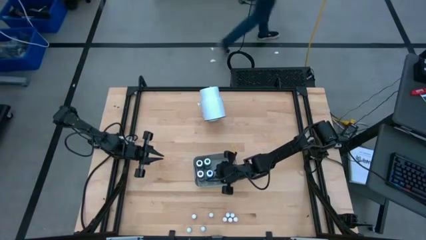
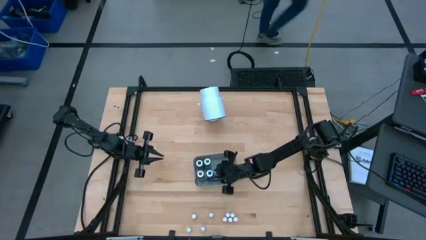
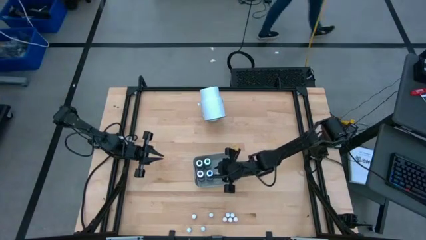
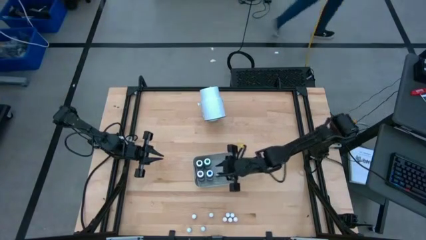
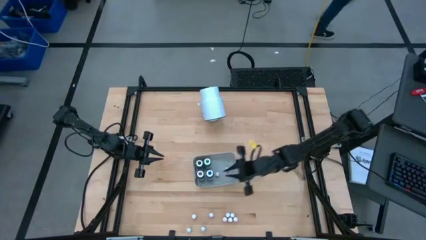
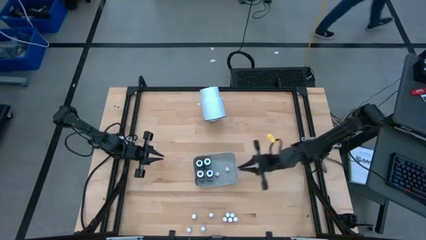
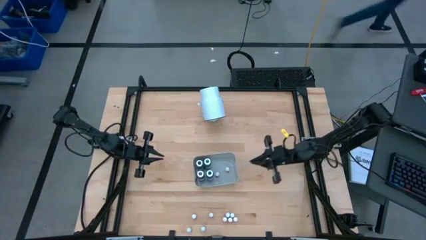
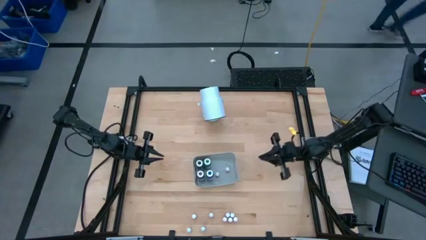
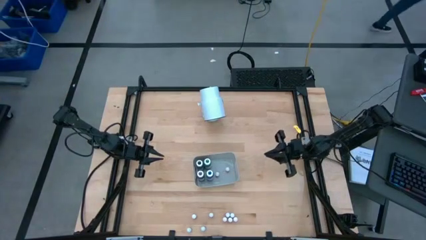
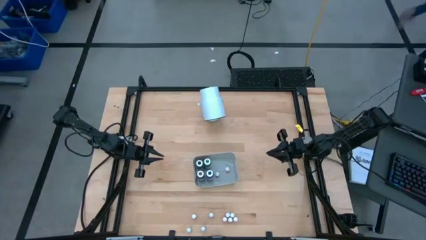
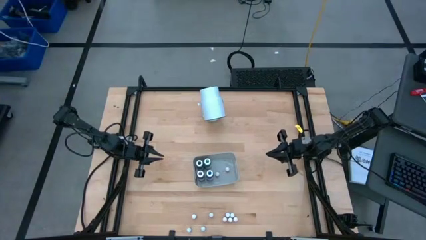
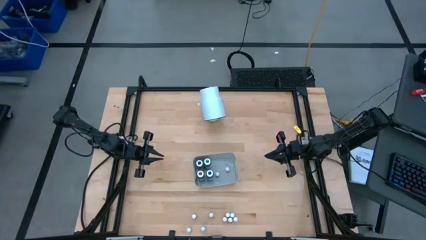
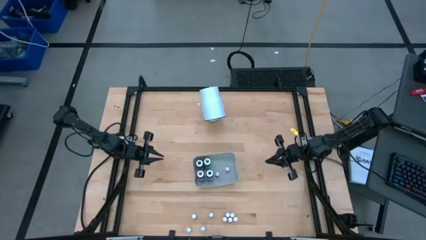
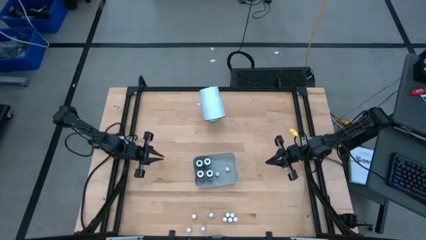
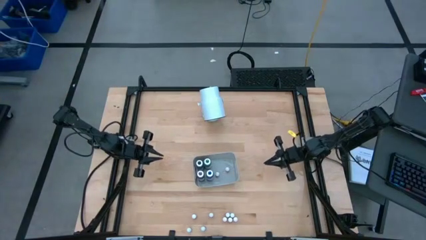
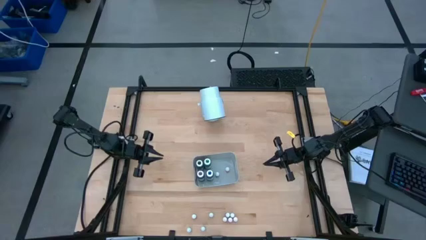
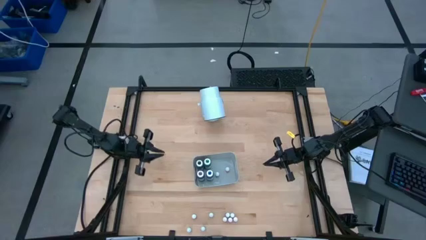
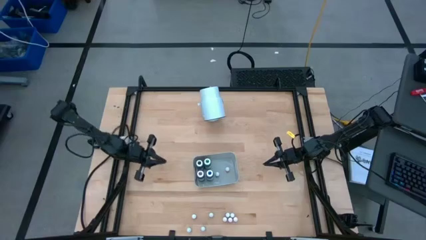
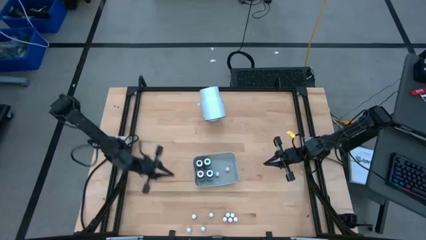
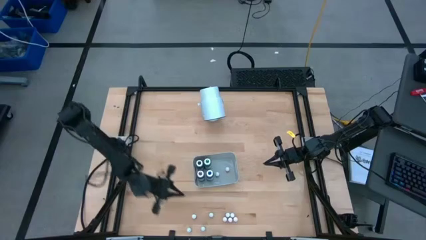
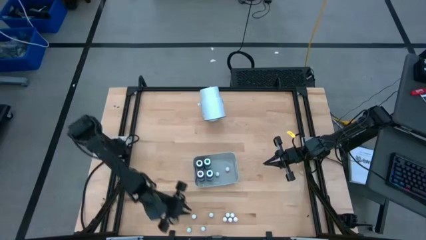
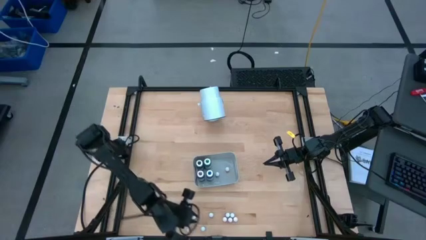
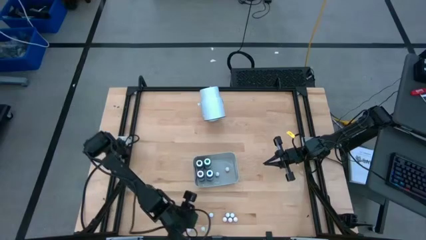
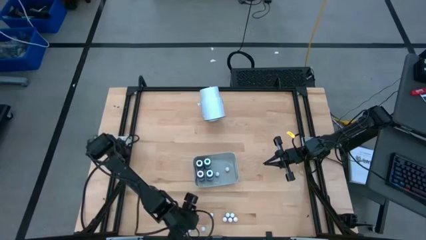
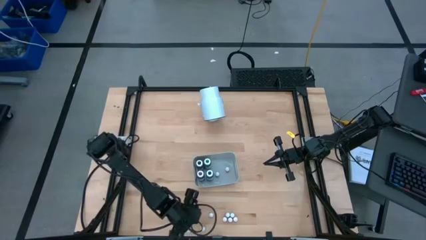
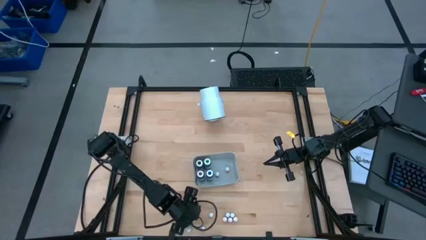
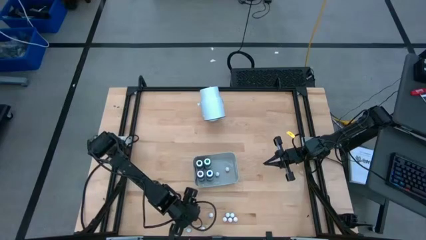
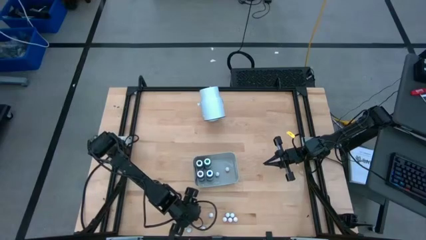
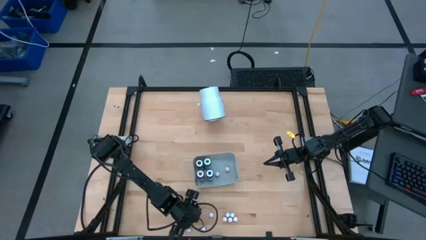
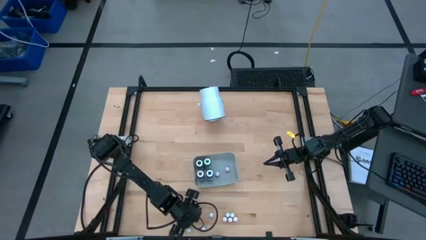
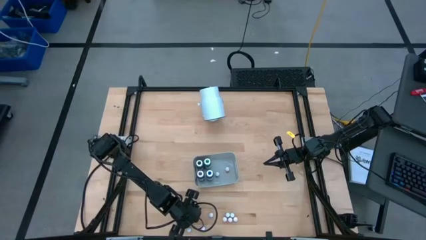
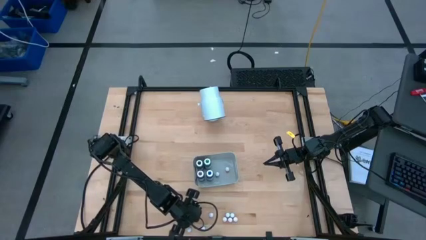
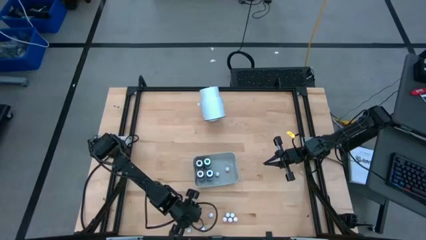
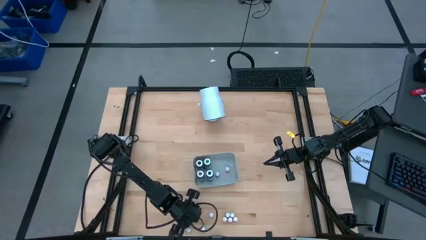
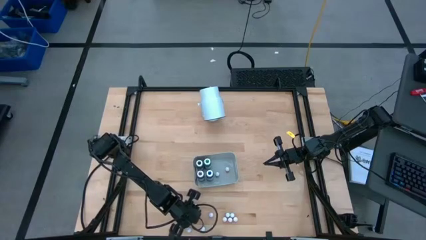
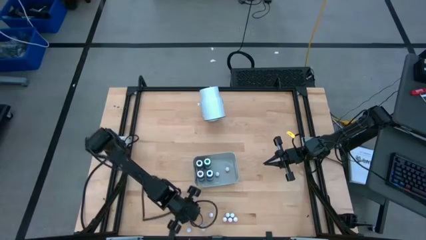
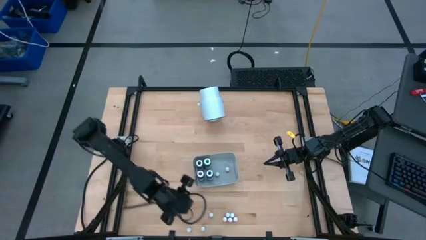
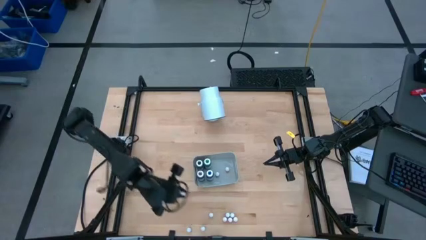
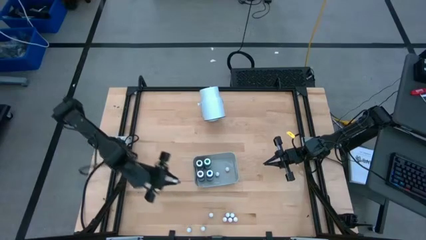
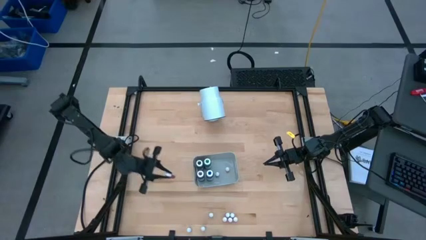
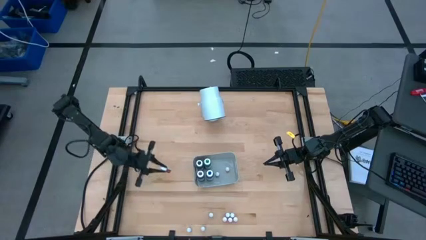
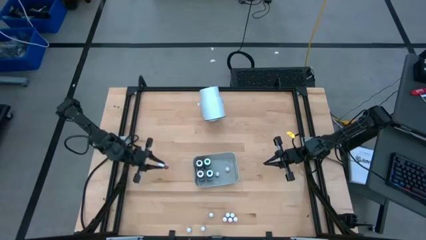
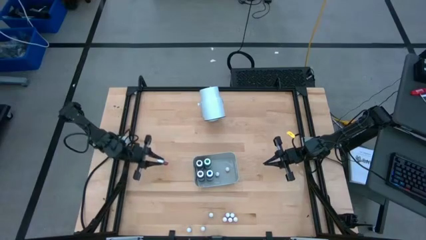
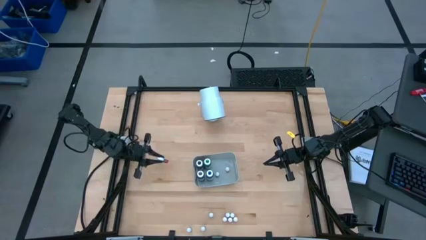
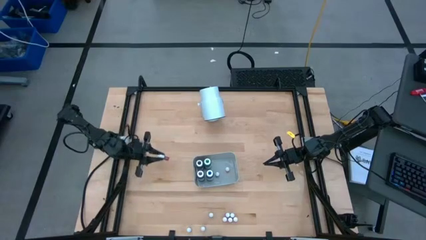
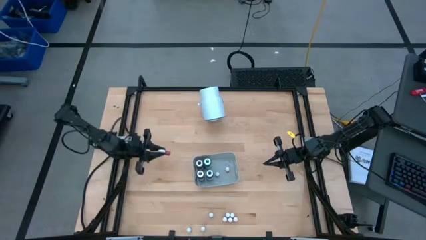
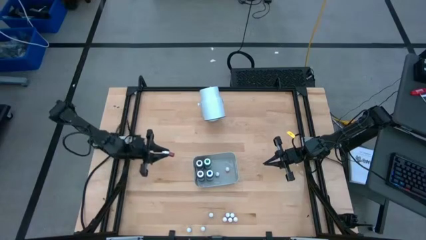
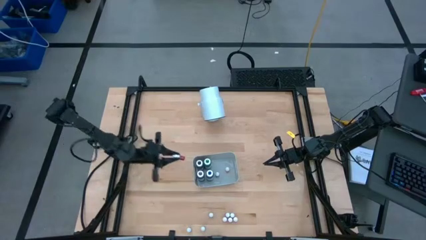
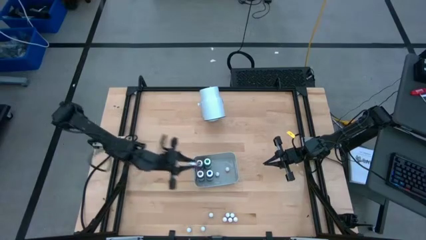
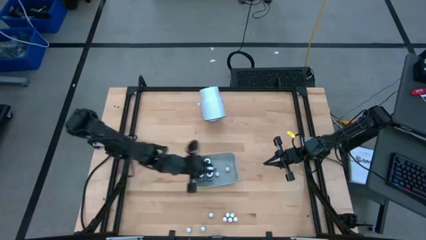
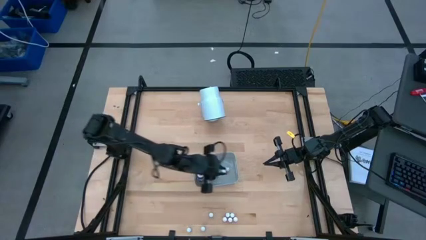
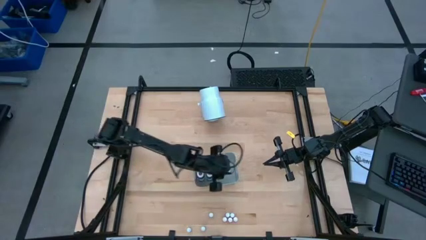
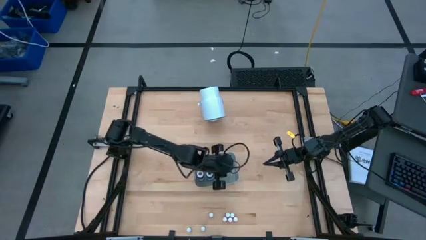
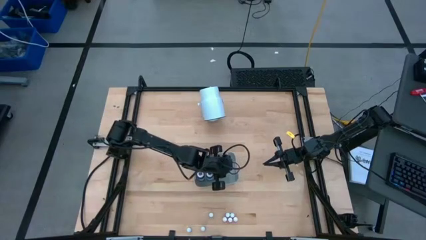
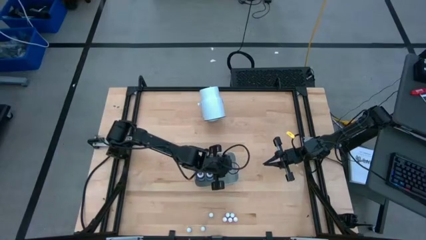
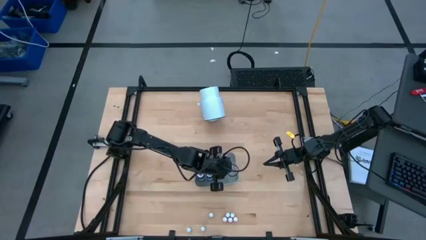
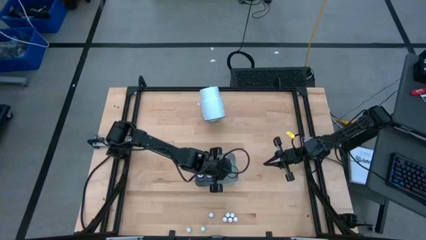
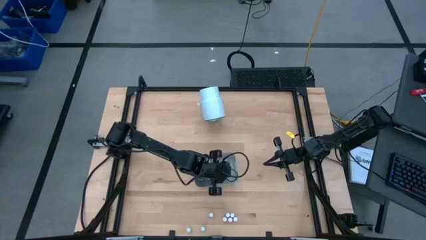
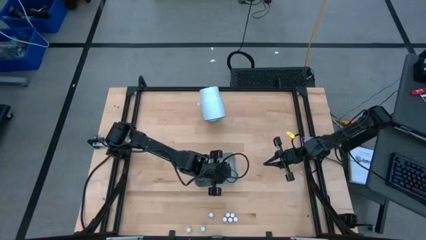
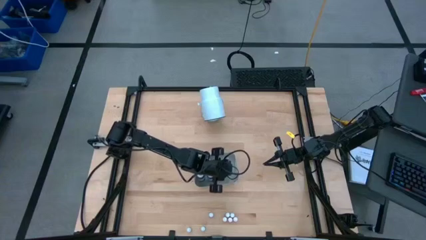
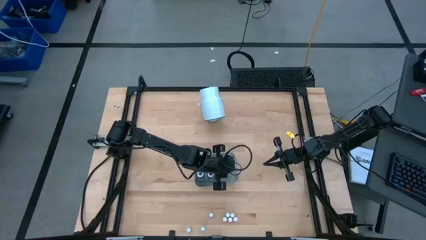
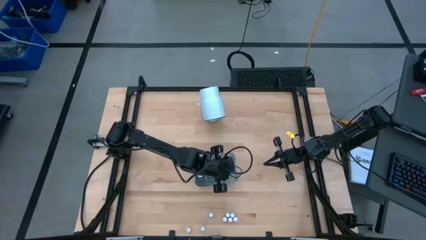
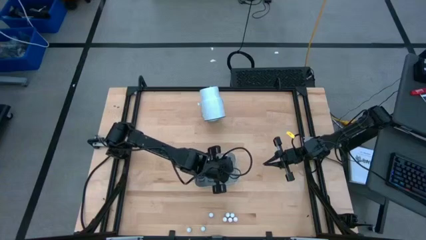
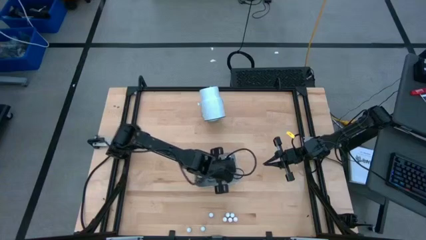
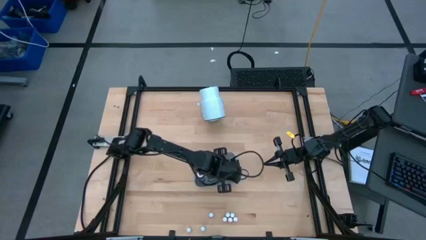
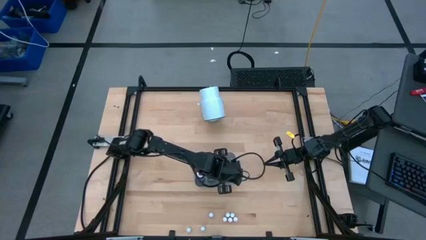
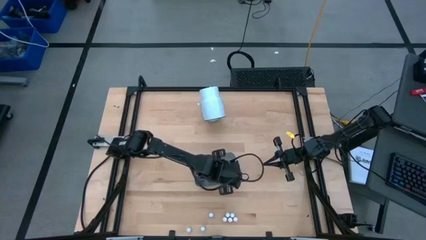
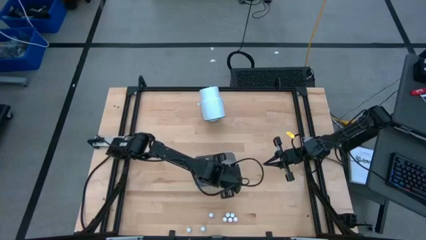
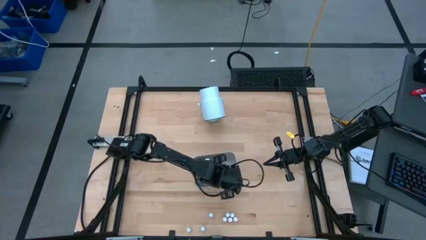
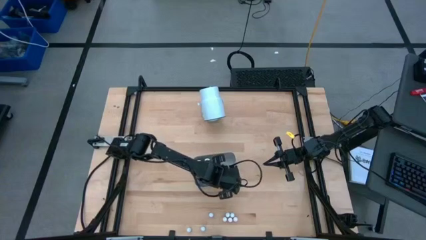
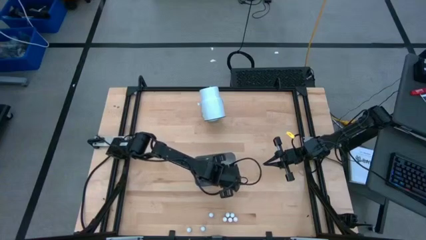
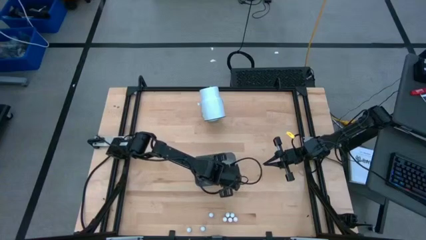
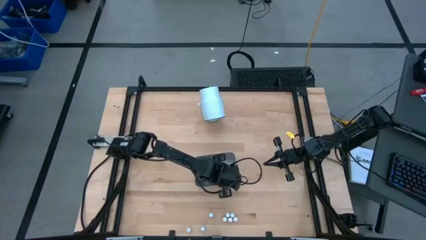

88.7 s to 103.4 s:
Task: Pick & Place food coloring
Put the small red food coloring into the gray bin

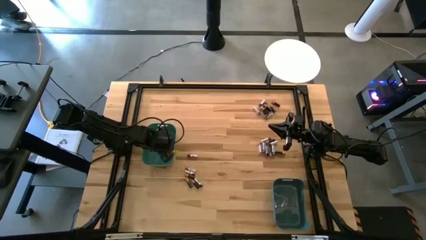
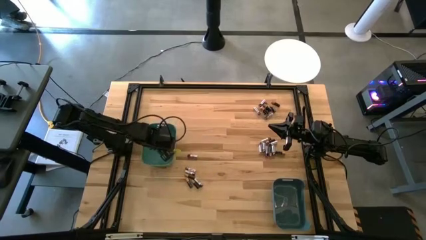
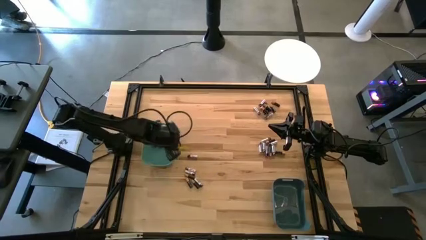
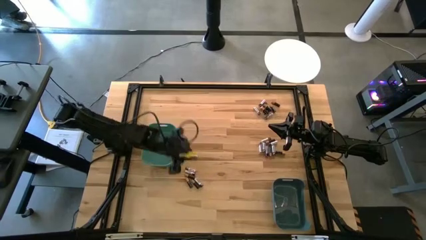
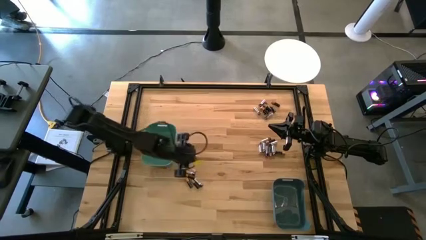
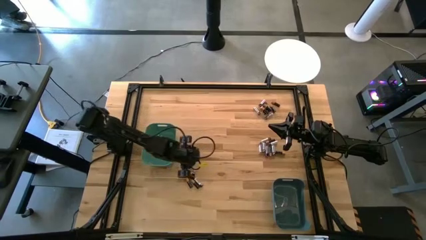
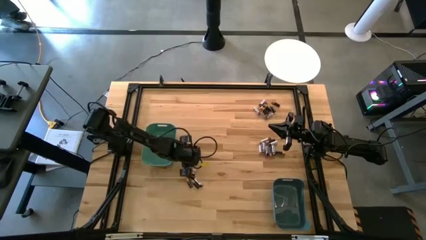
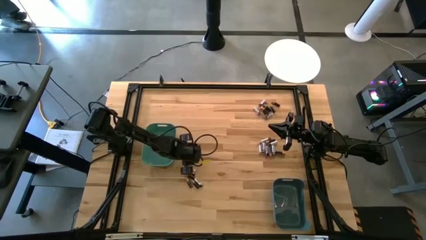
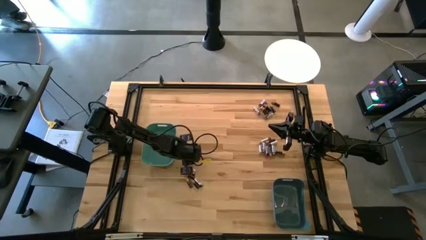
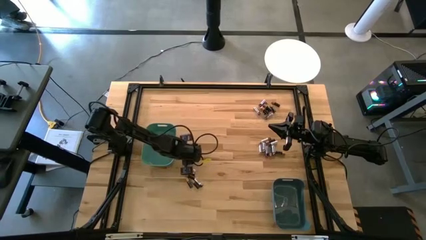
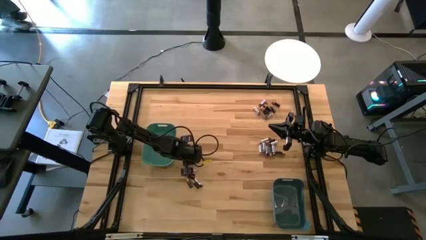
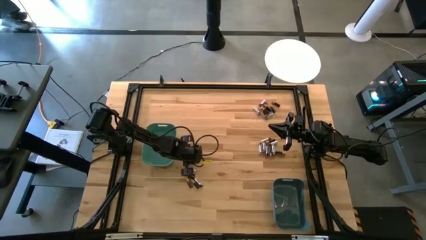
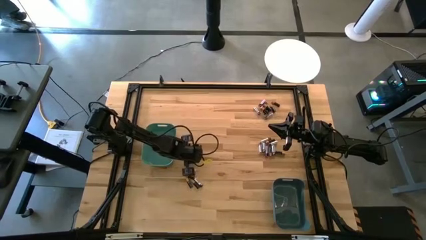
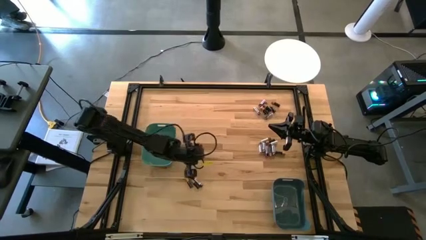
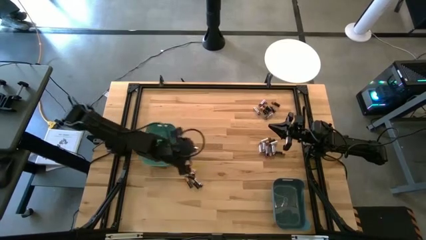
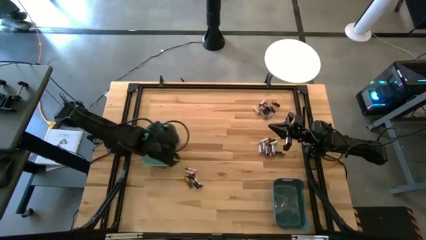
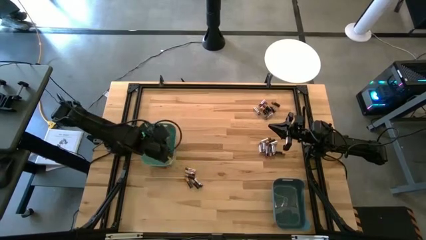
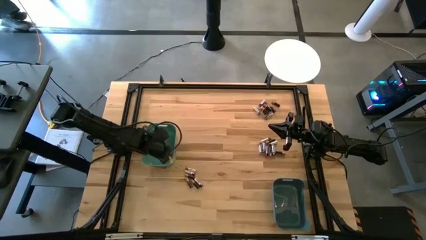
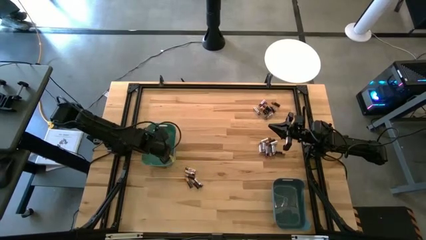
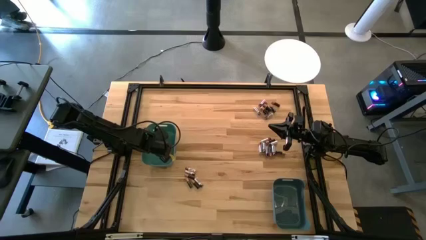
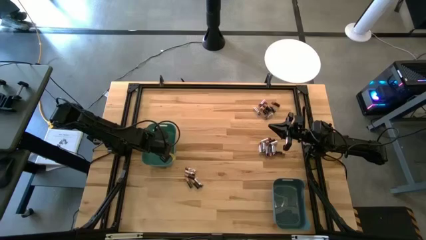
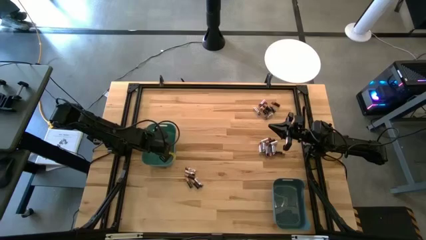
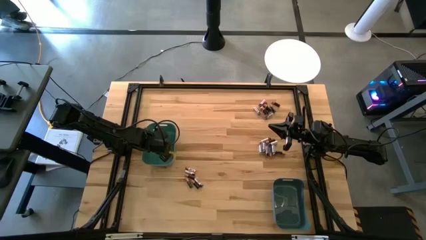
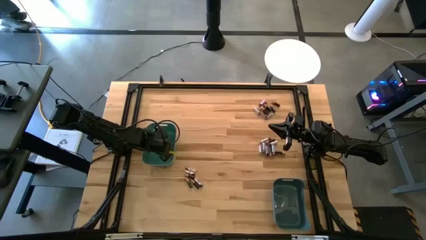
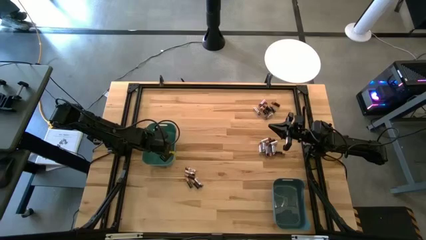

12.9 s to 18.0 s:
Task: Sort batteries
Put the silver battery into the green bin
